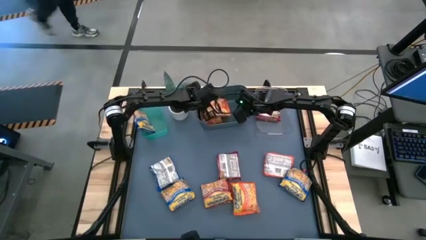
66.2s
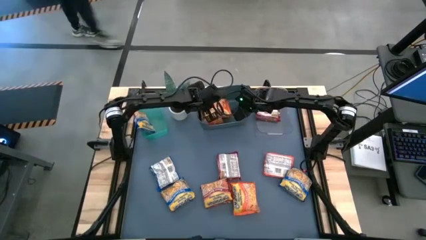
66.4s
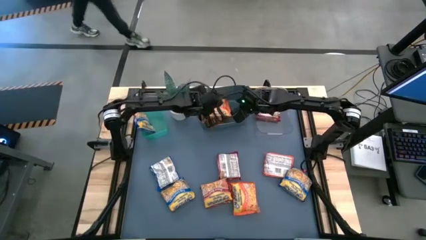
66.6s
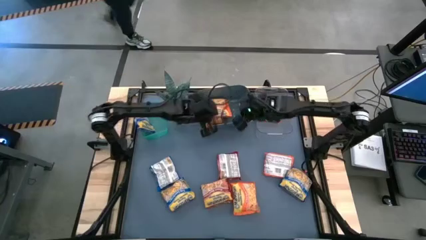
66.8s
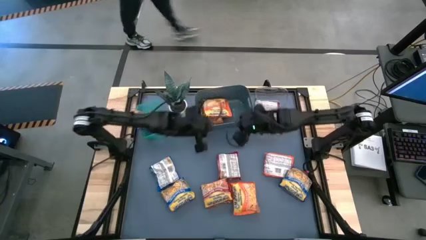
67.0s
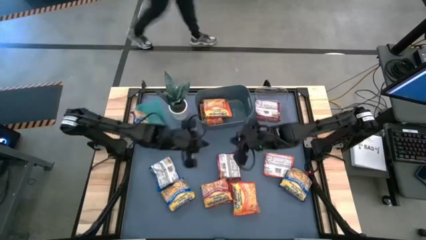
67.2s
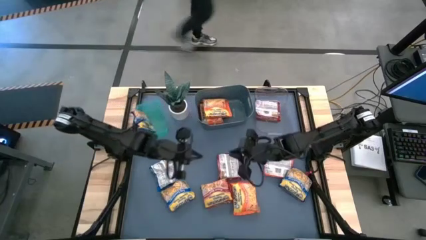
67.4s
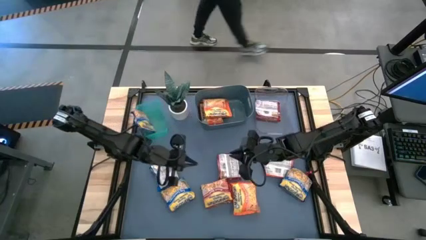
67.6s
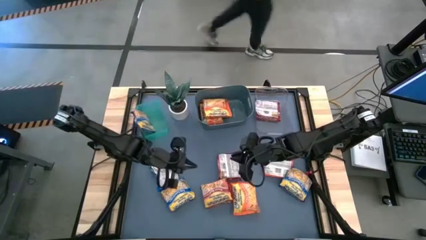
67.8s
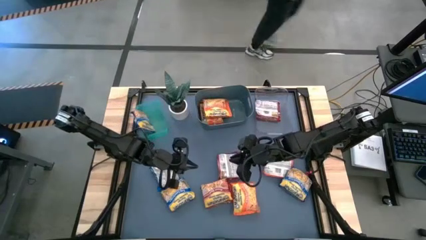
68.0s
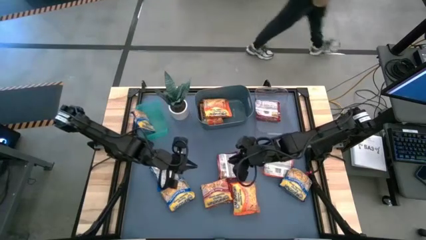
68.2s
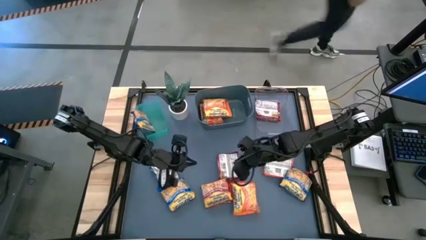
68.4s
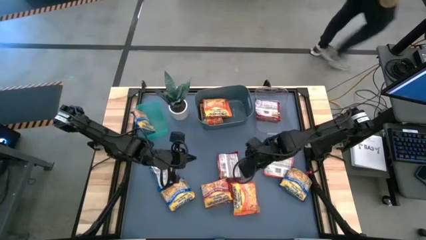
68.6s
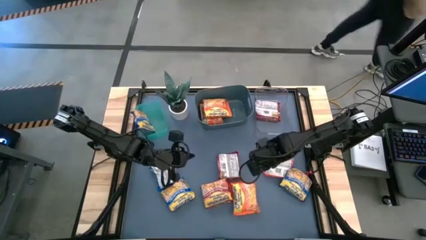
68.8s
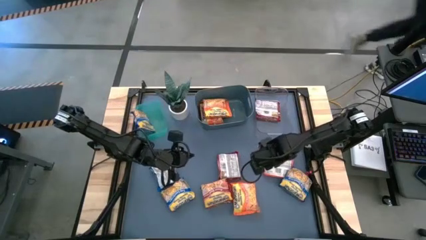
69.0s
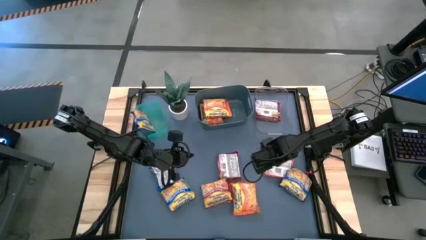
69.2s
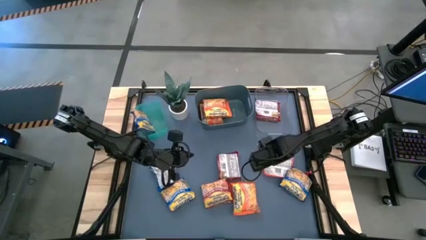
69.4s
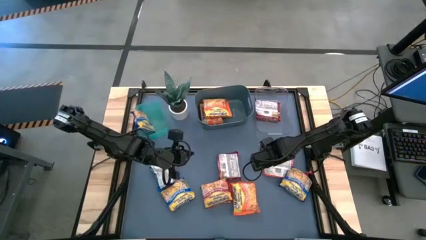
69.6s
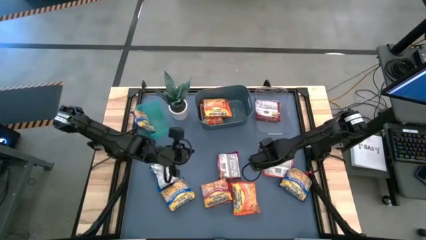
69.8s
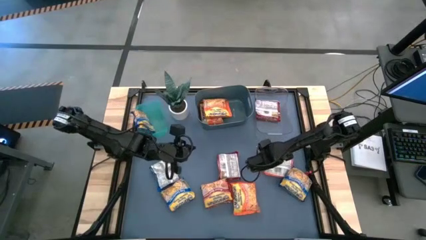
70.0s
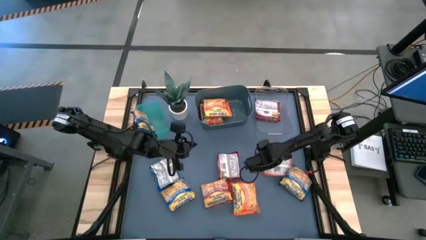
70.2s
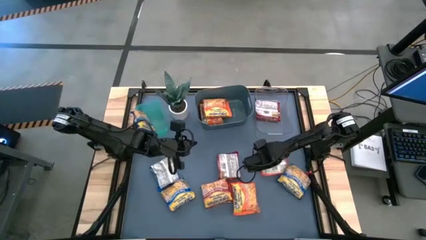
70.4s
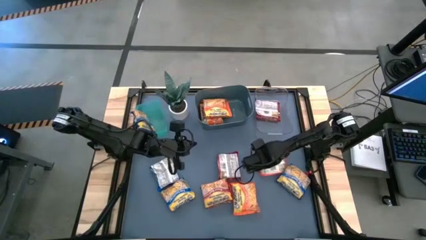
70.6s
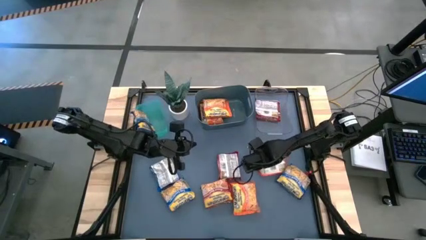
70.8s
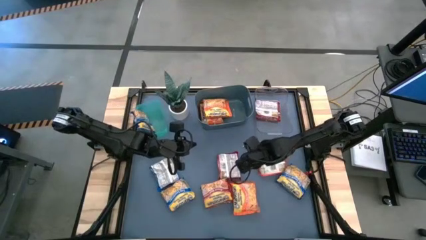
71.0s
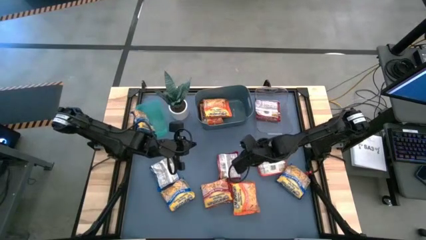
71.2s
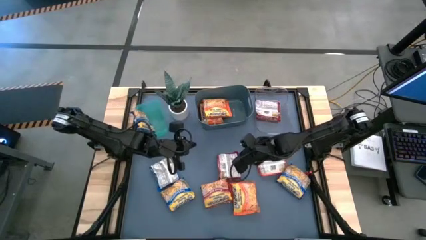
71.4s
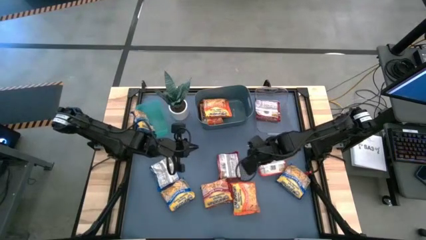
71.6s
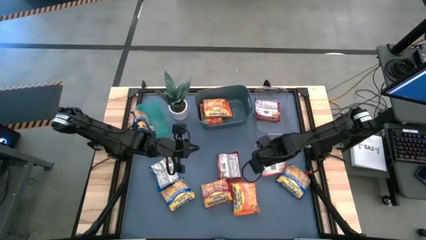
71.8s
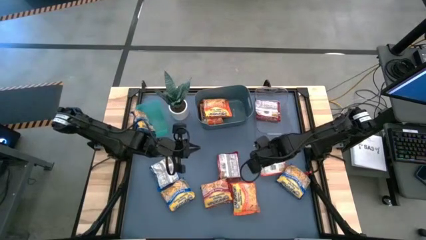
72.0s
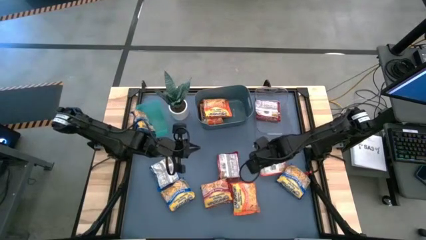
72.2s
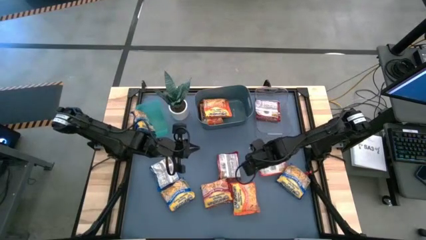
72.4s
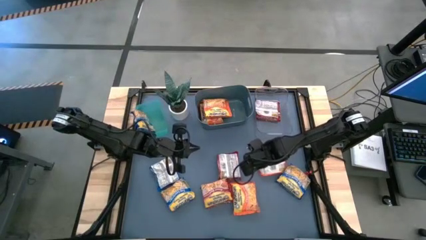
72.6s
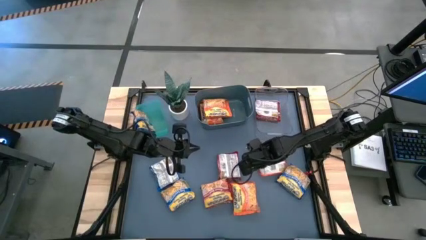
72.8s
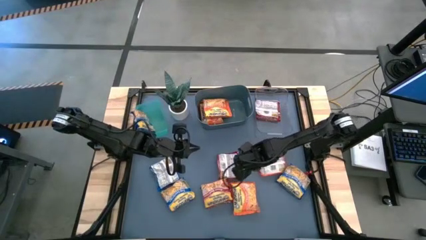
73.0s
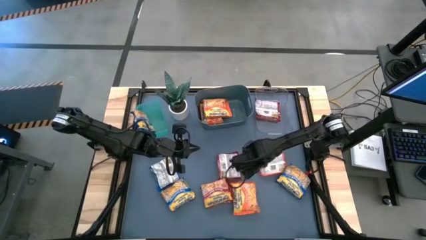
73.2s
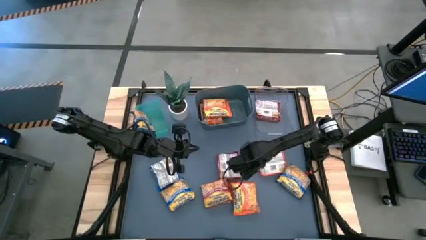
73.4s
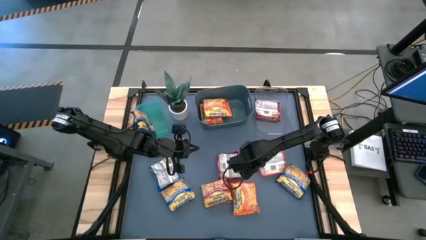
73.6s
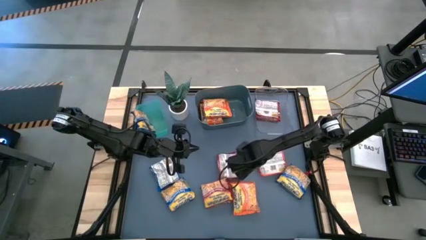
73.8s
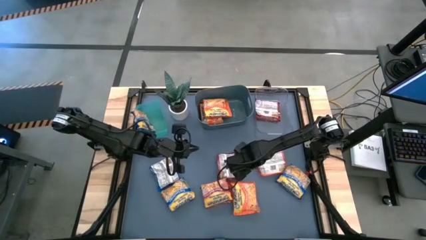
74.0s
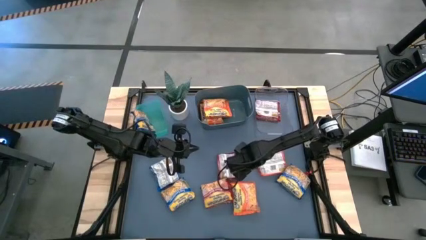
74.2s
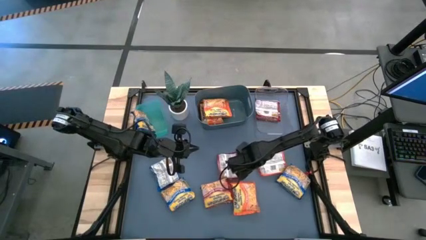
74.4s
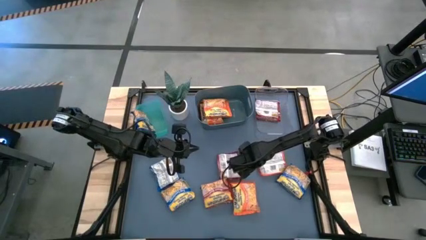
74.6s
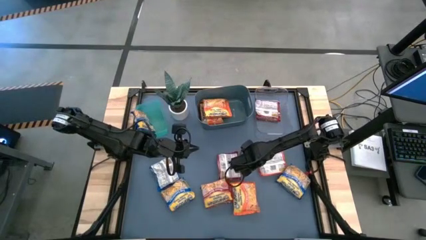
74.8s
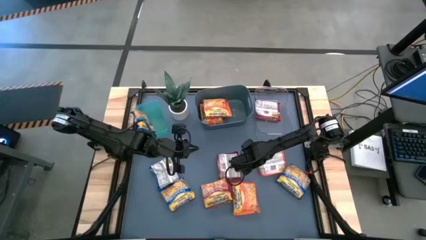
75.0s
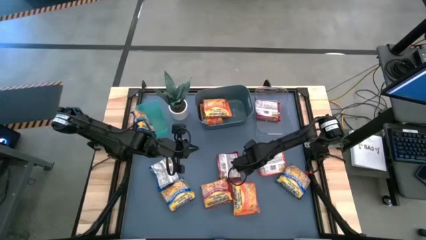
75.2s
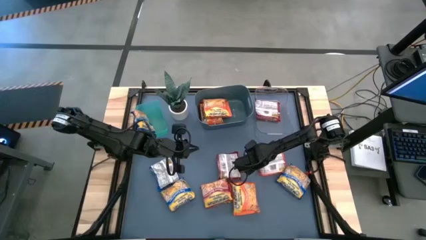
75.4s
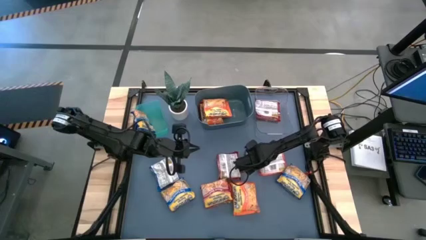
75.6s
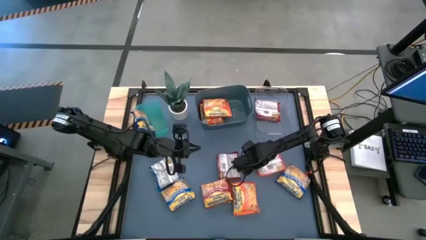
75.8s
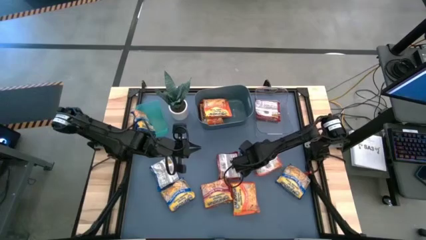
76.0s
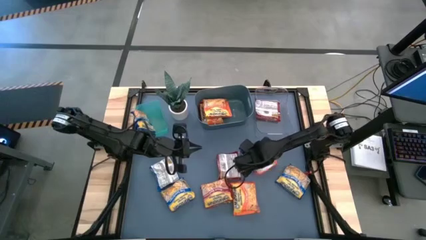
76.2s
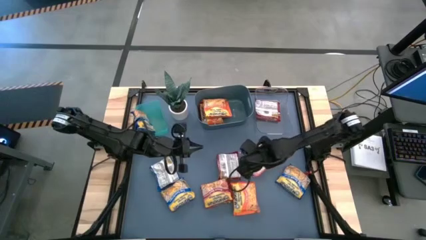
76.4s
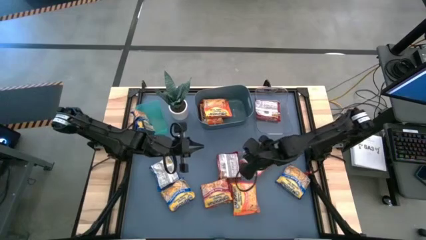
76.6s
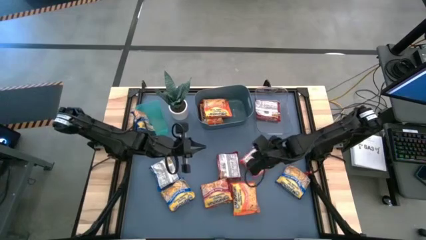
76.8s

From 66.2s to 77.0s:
Task: Sort Maruchan noodles
Put the orange noodle pack into the blue bin

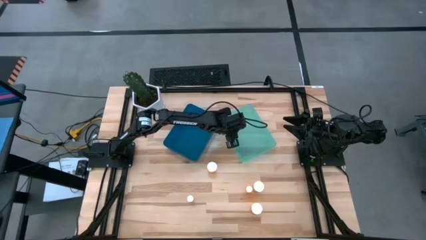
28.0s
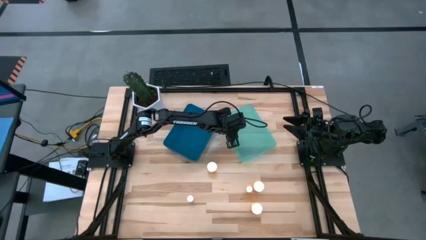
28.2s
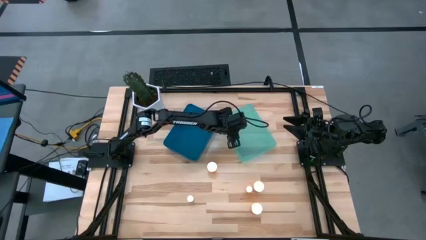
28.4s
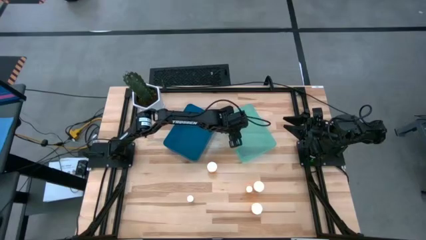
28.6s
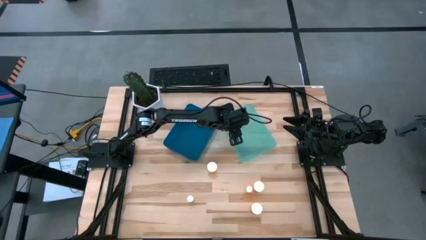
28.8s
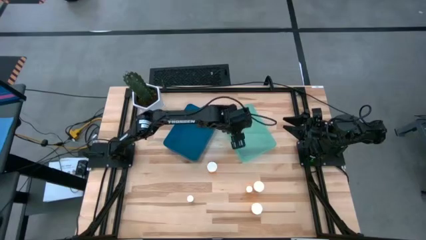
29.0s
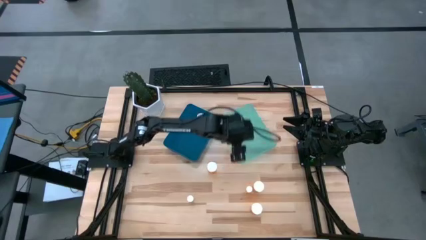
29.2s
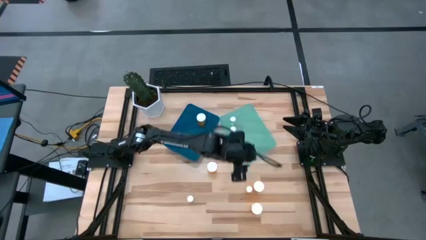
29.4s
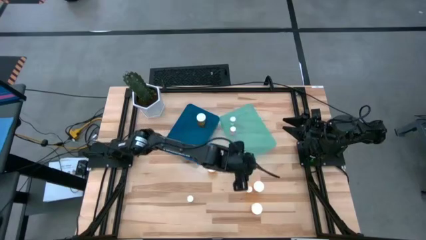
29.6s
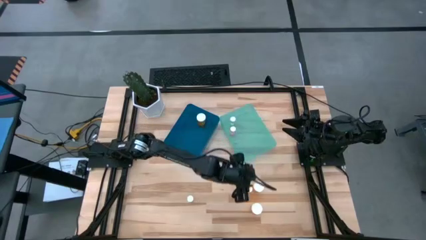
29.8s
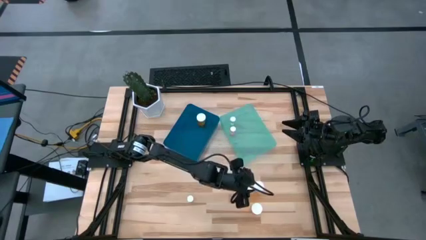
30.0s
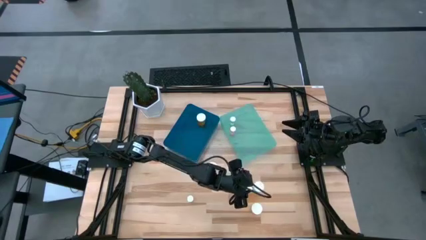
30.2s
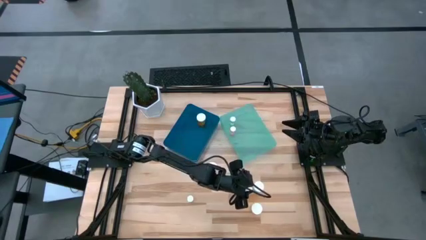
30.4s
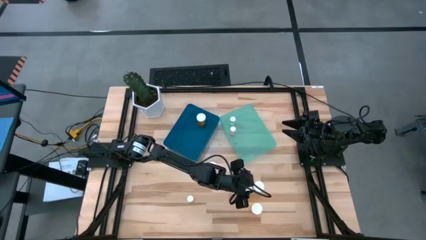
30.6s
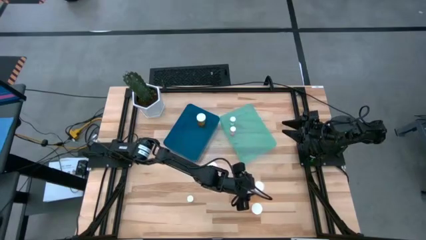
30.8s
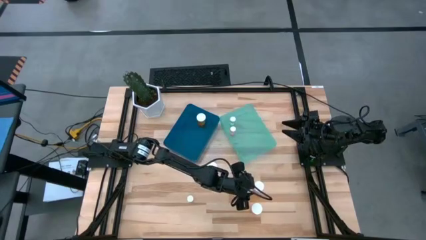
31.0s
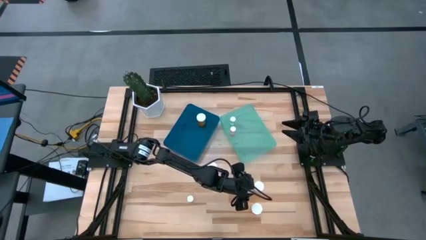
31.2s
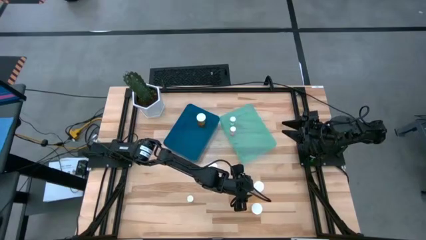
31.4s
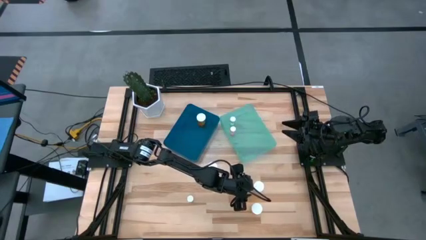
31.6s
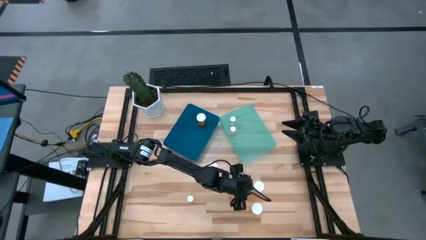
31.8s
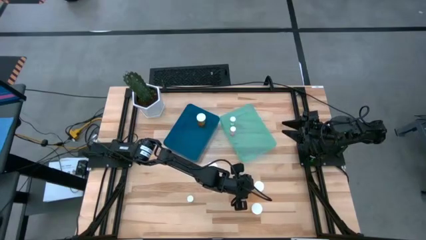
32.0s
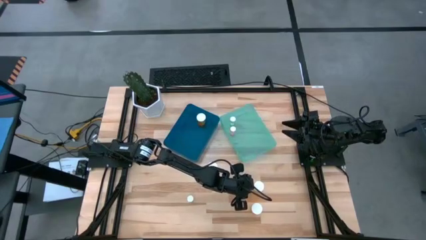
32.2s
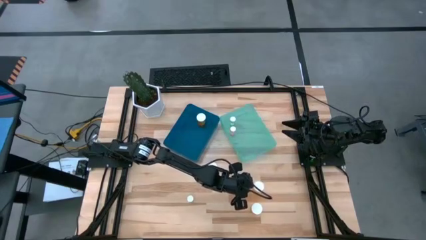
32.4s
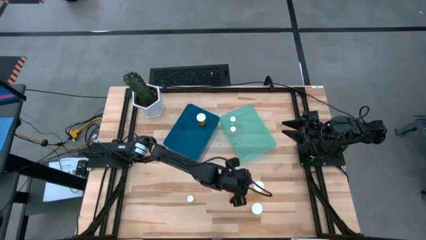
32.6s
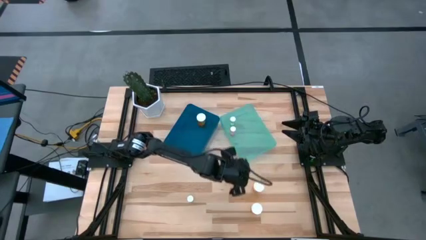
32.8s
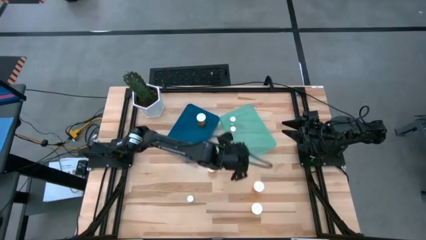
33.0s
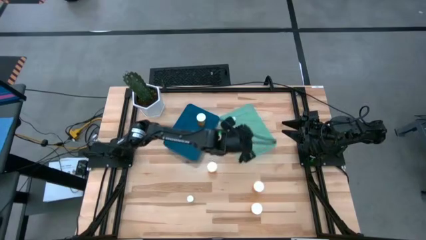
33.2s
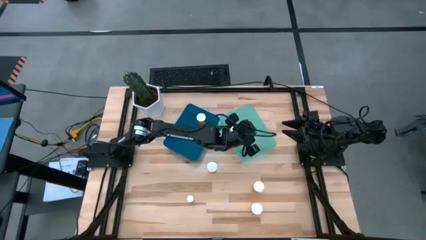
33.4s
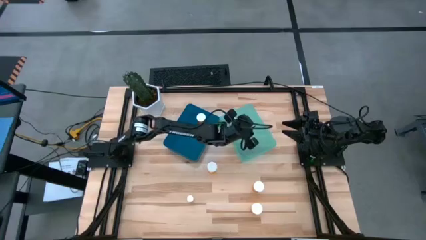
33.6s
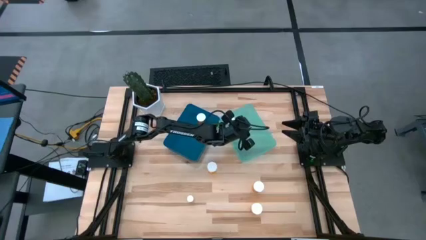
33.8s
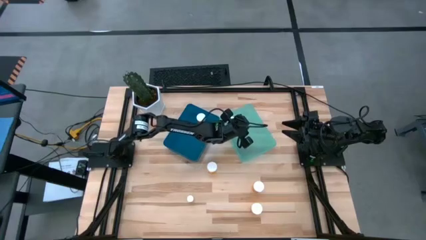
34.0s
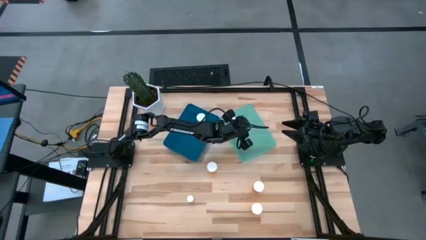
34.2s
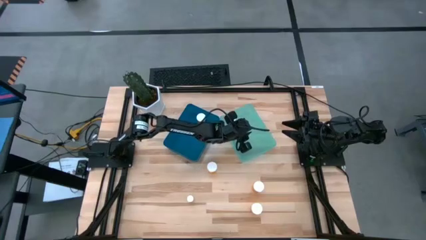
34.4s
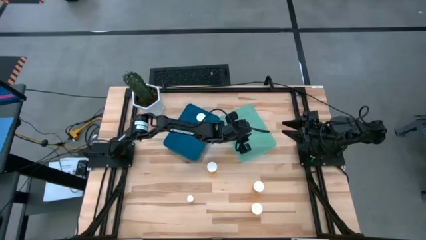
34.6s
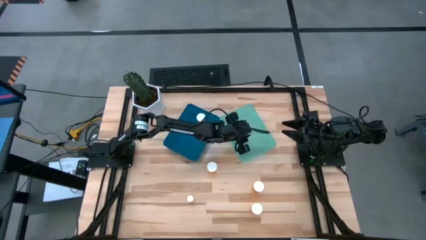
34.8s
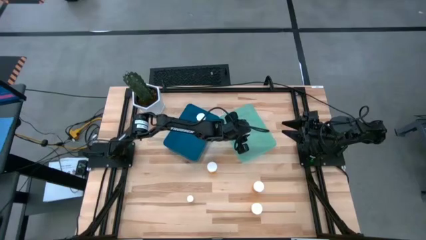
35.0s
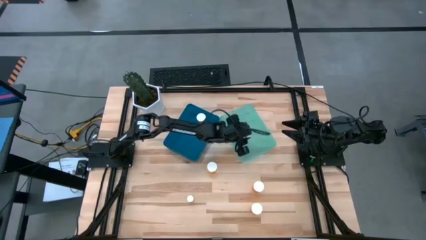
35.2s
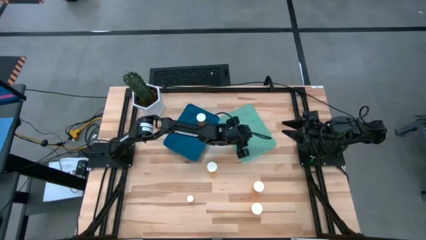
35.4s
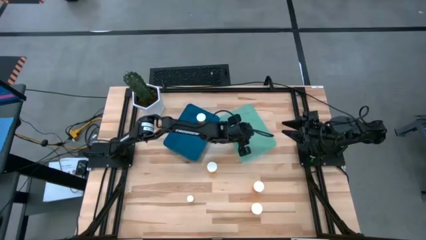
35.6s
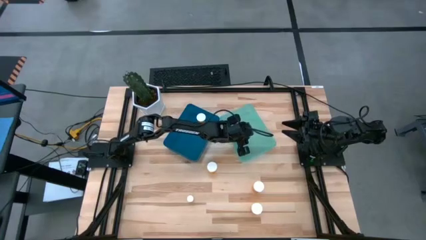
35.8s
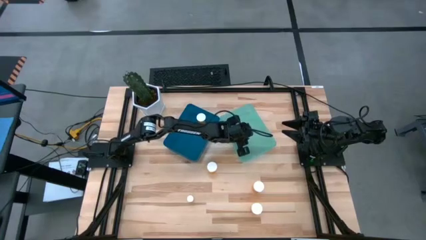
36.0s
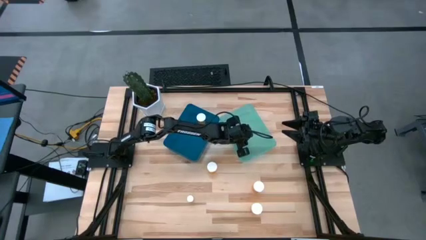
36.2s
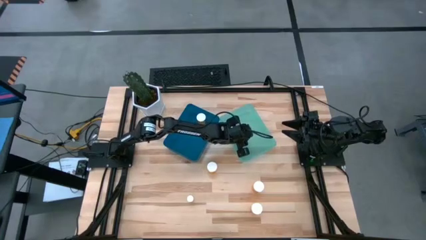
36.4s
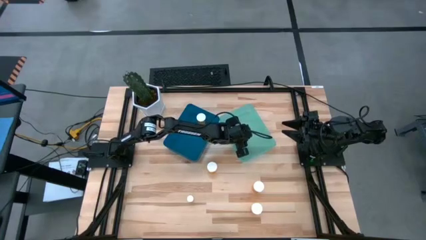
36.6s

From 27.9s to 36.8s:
Task: Pick and place medicine bottles into bin by pill shape (circle, oval)
Put the orange pill bottle into the green bin
